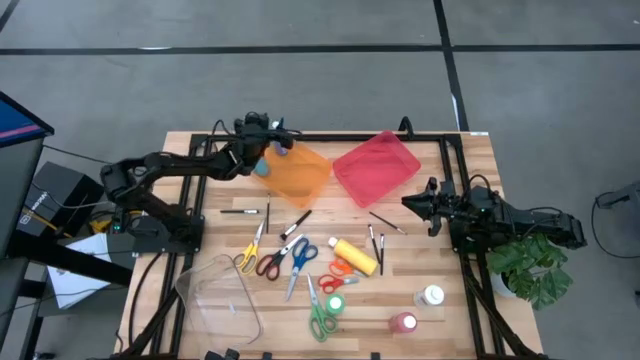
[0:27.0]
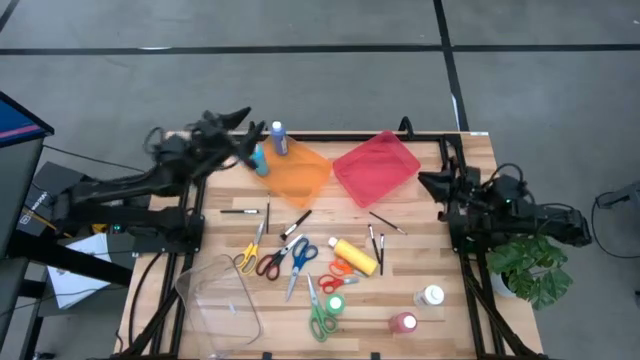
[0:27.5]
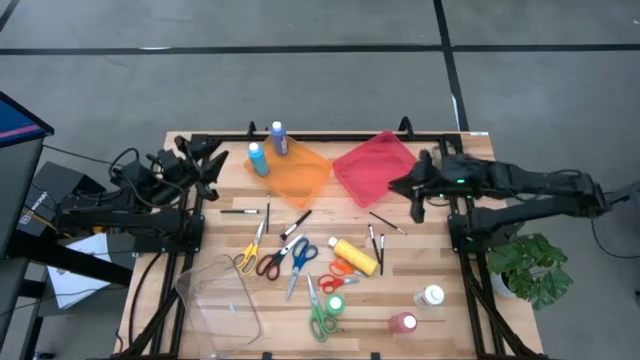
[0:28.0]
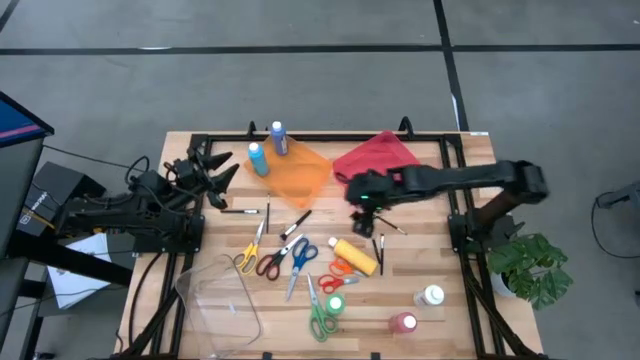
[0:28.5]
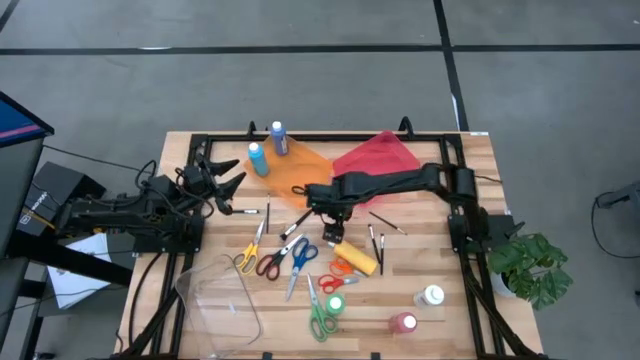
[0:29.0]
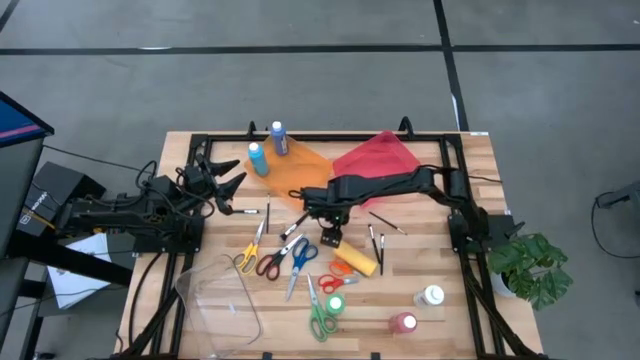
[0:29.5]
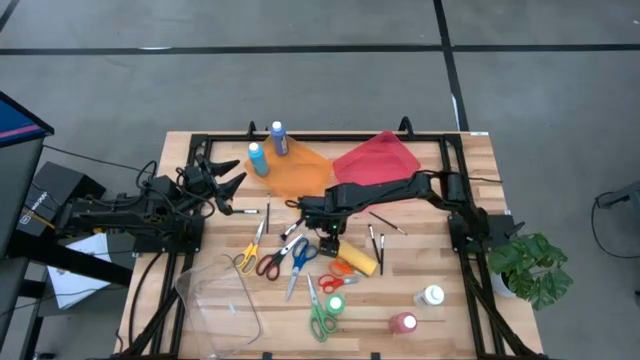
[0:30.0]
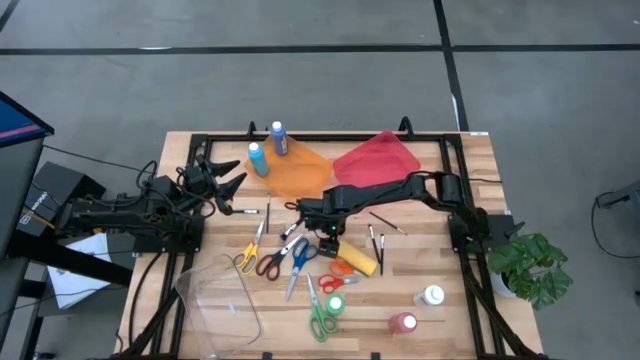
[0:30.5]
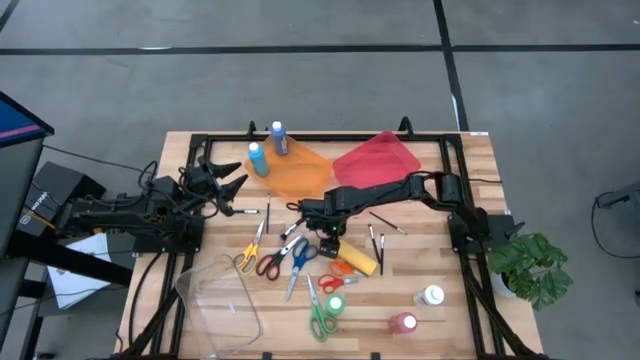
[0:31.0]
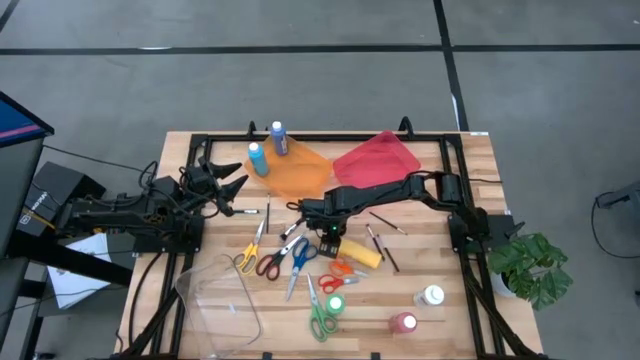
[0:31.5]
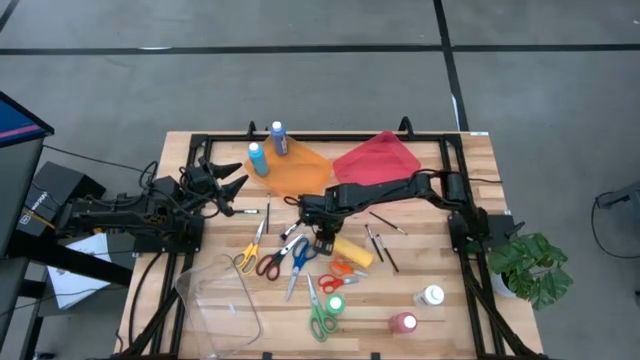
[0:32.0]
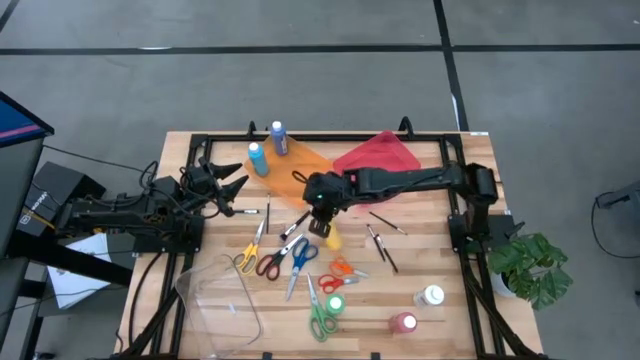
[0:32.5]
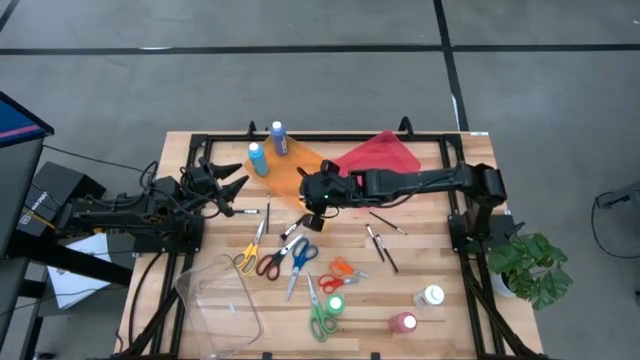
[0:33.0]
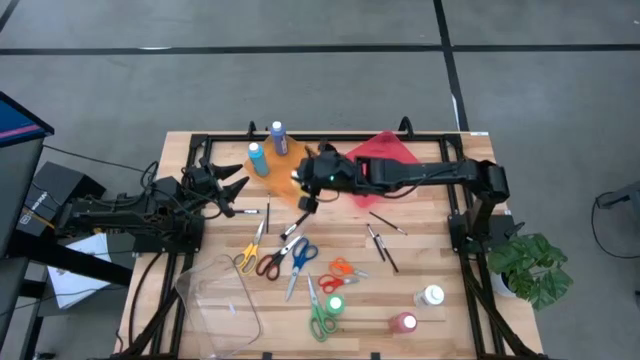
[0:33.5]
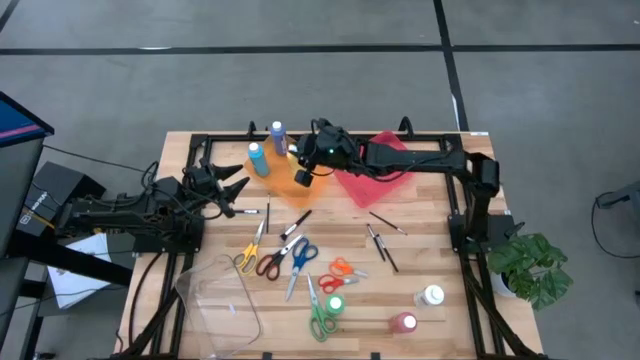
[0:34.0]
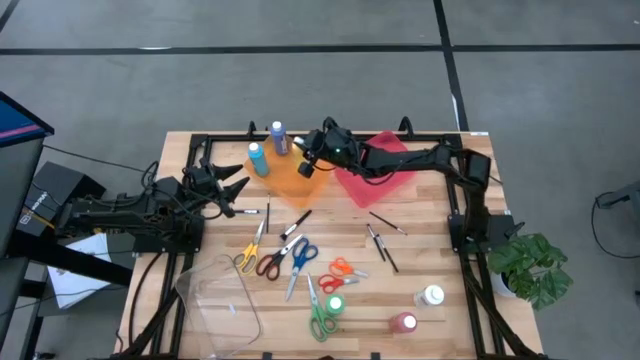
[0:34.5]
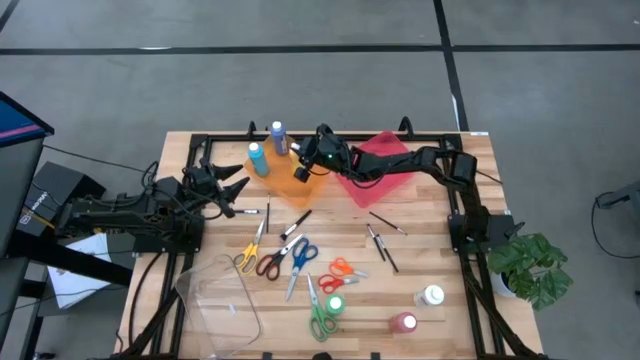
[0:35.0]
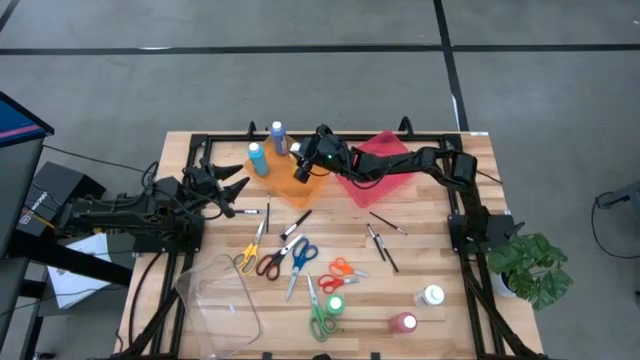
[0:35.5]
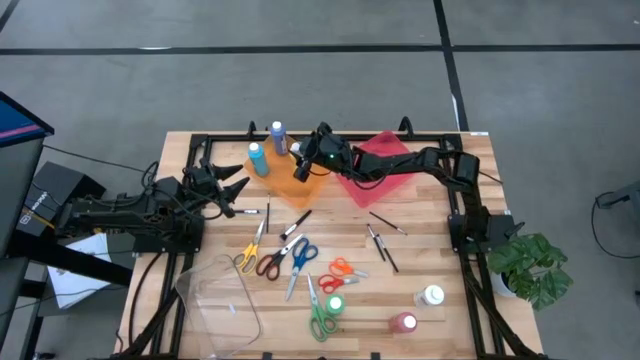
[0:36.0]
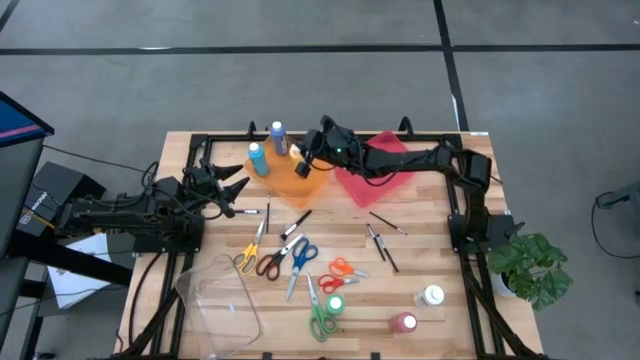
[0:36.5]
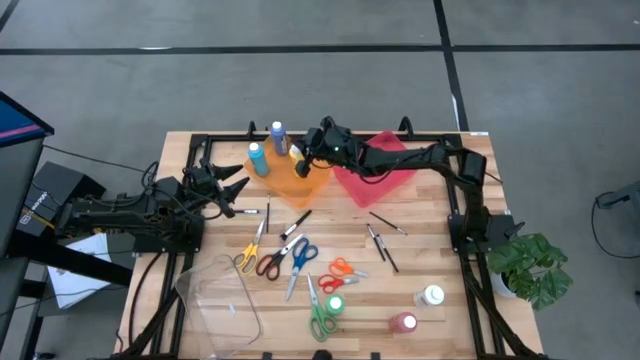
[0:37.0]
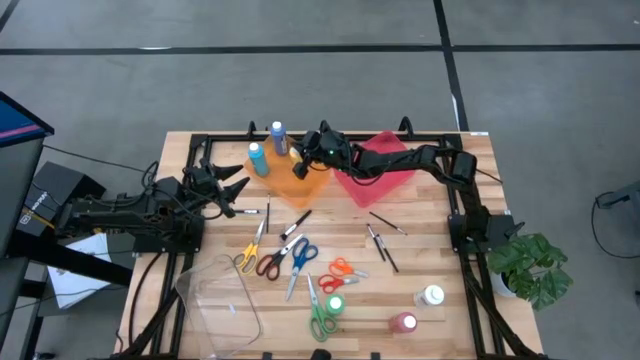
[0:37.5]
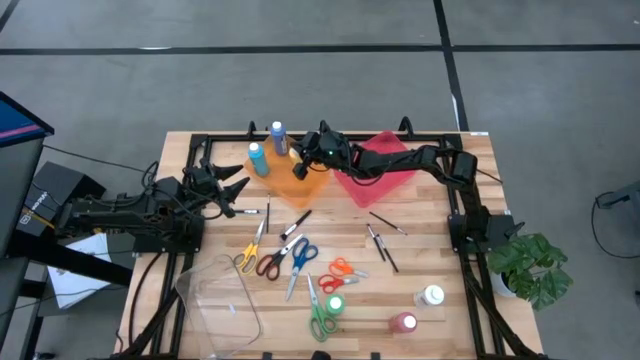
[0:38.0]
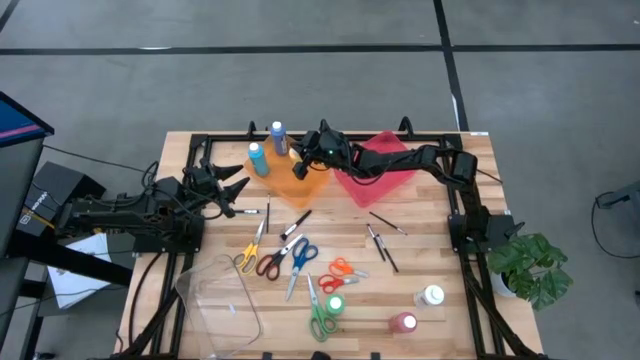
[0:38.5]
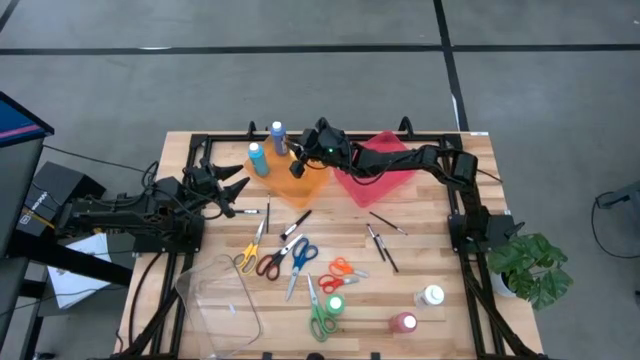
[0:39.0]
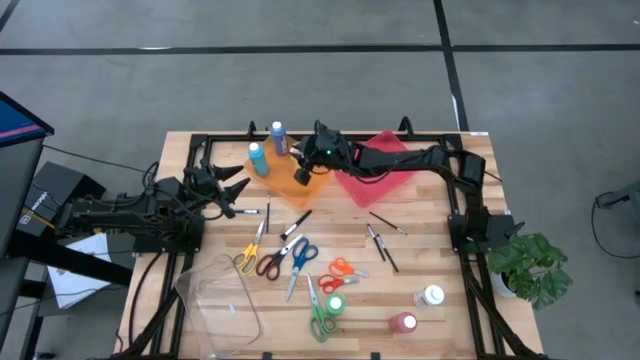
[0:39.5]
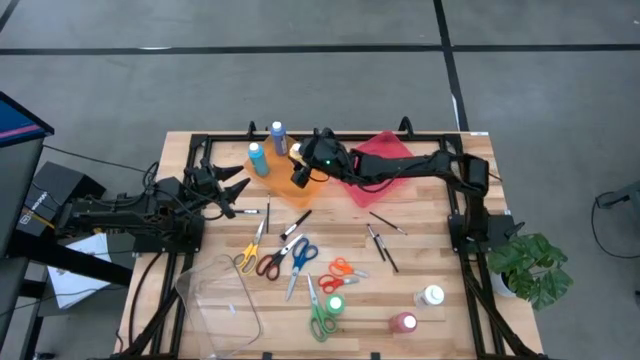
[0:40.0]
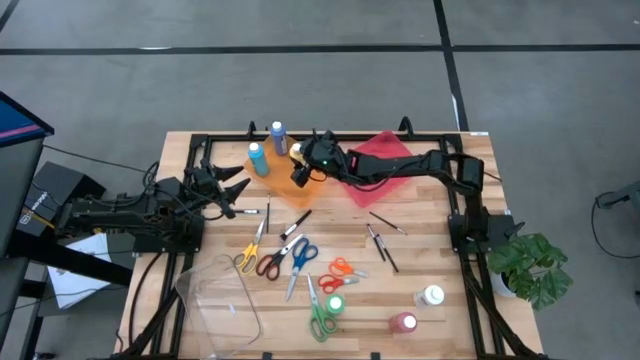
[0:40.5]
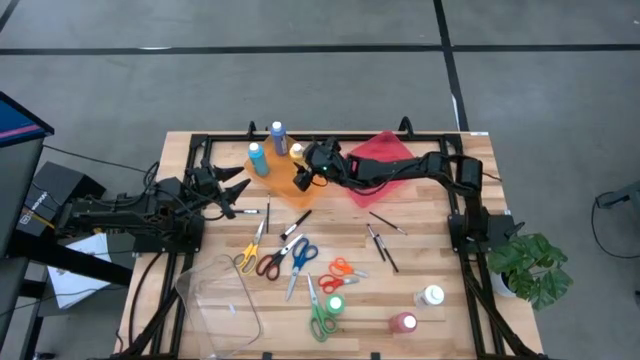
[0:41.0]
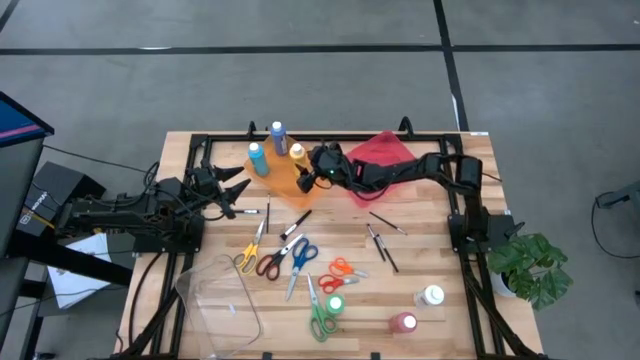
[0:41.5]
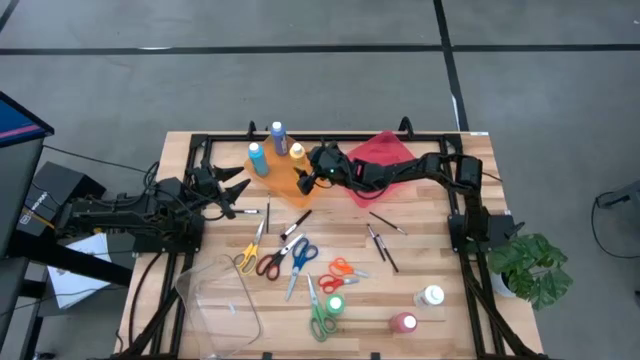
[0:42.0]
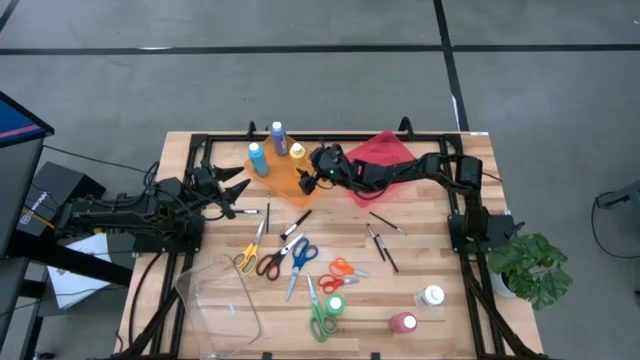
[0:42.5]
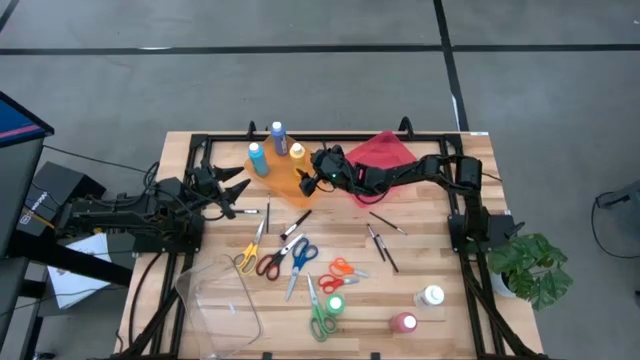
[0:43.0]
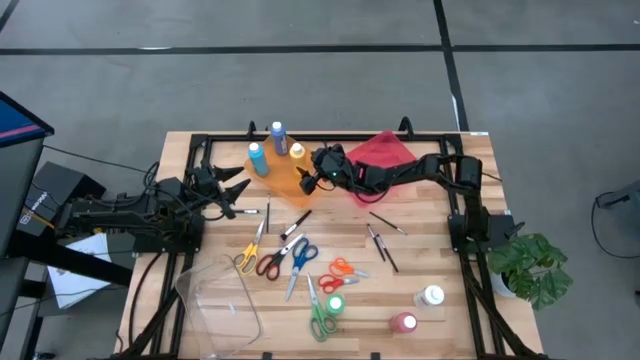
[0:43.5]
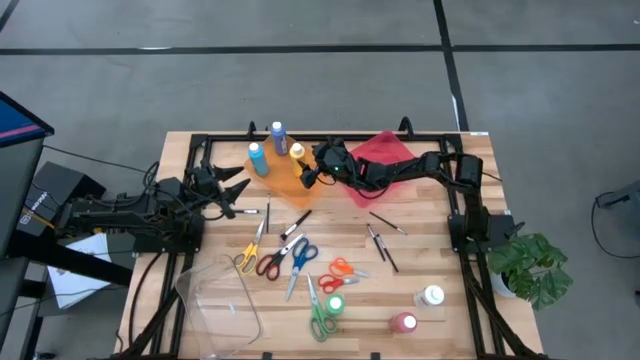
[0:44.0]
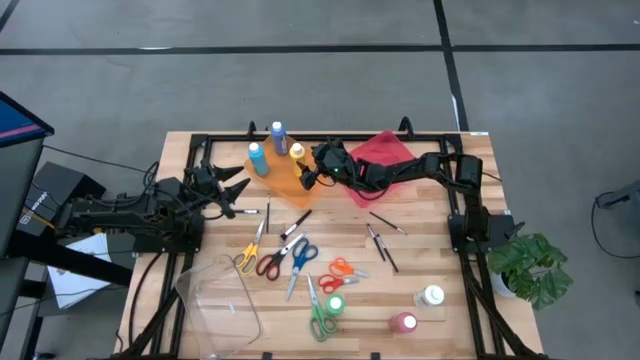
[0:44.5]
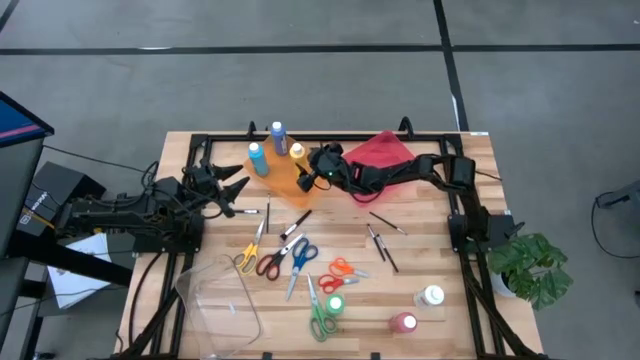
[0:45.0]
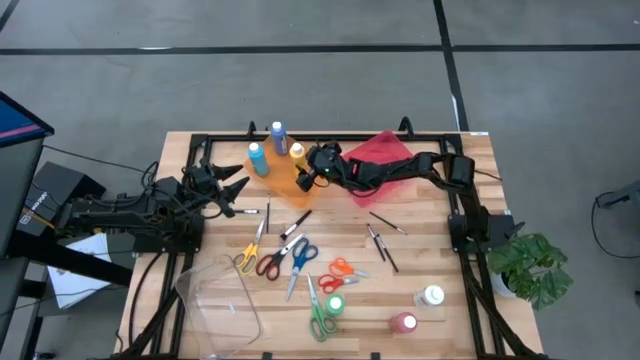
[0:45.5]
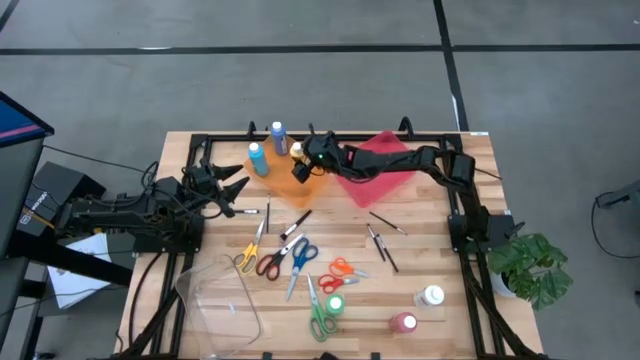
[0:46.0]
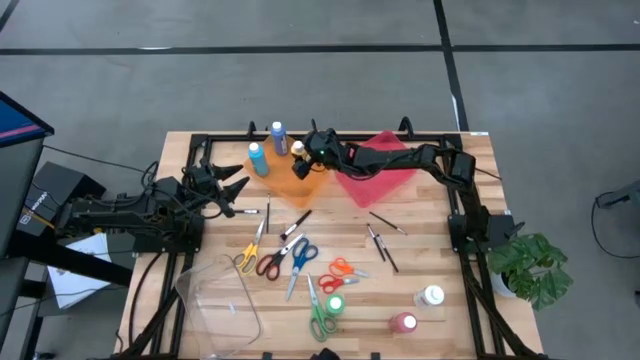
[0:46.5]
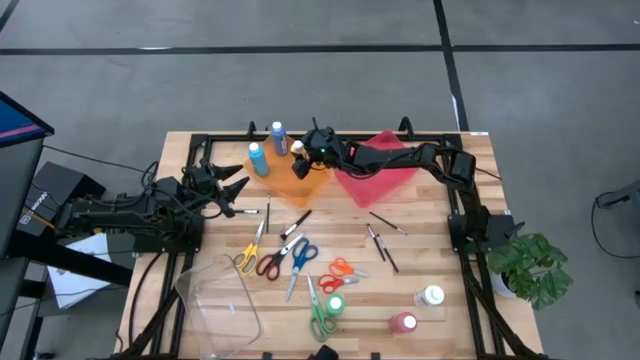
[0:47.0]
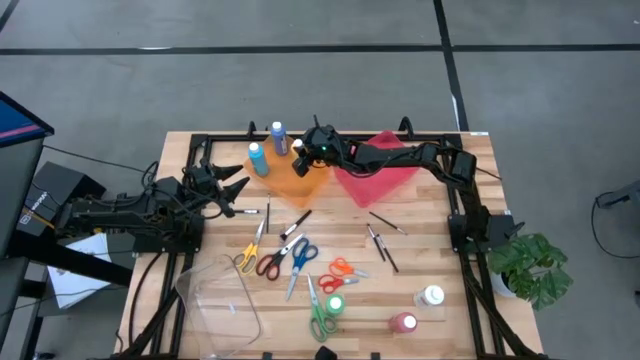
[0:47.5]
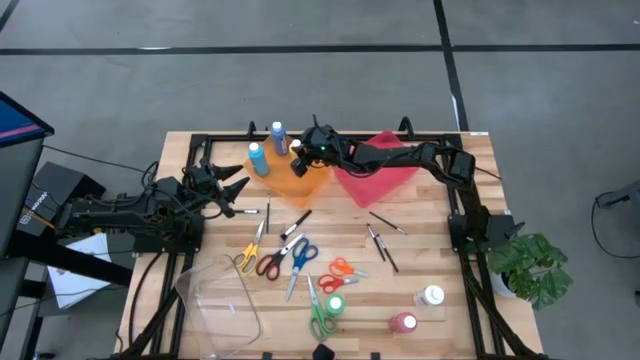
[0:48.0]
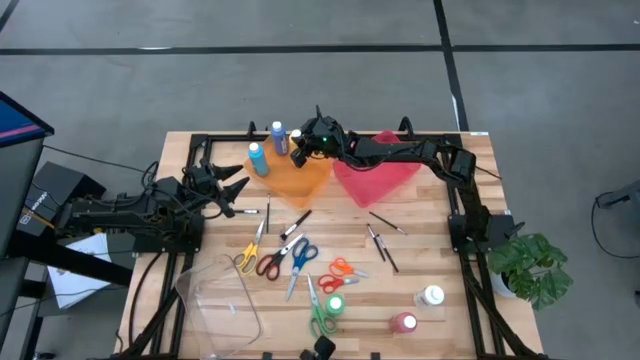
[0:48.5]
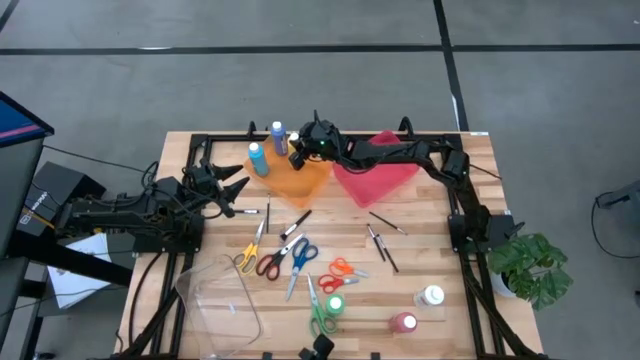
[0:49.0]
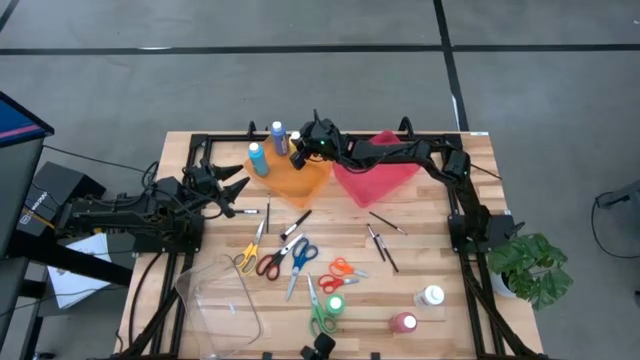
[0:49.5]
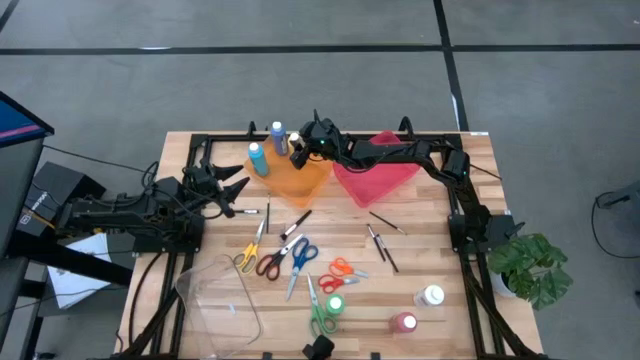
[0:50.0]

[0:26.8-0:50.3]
Task: Pick & Place Paint Supplies
Put the yellow paint bottle into the orange bin
